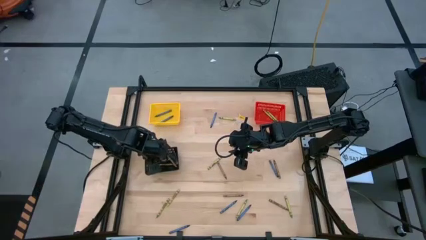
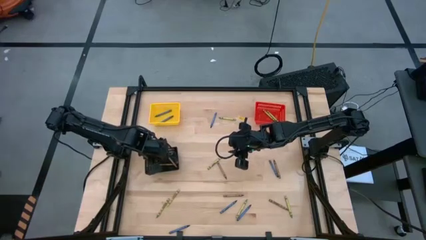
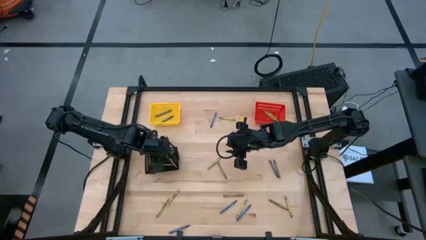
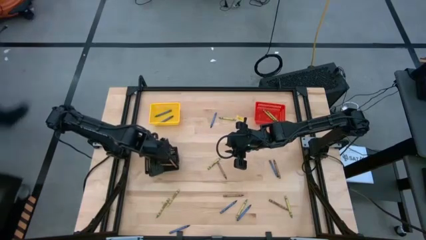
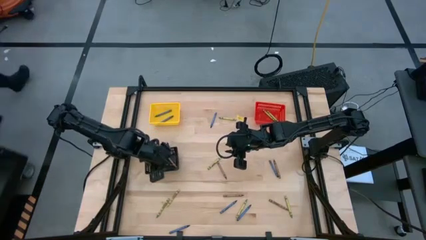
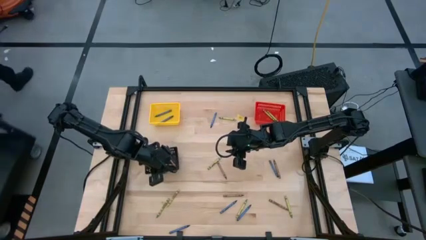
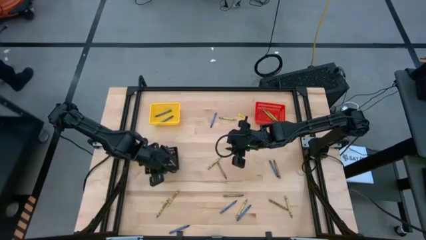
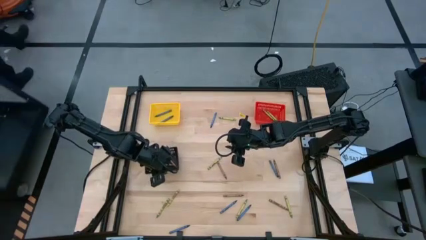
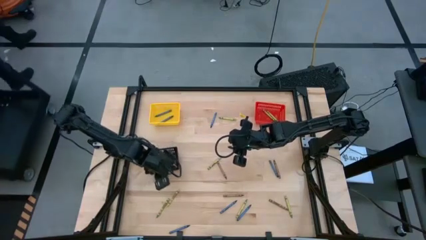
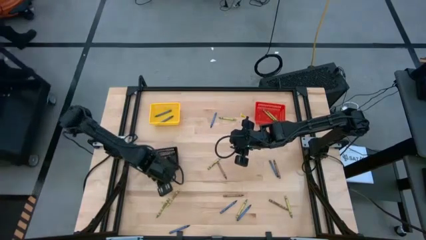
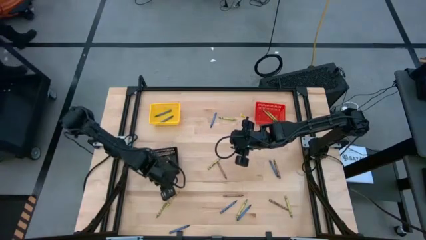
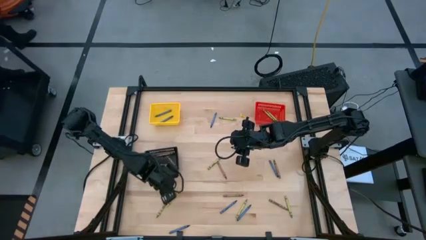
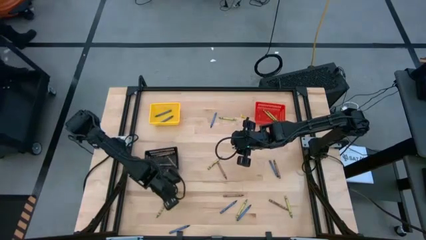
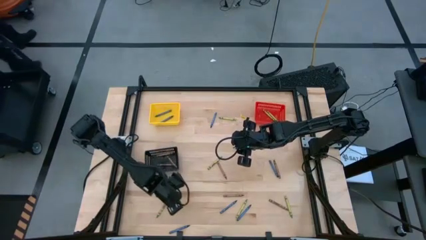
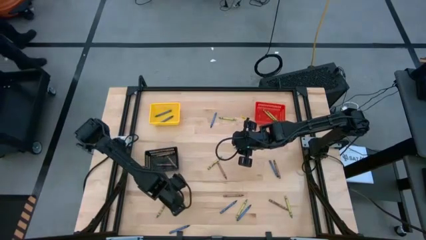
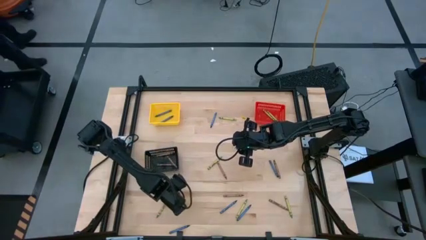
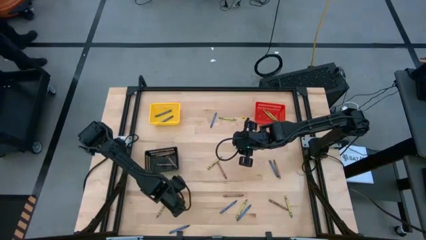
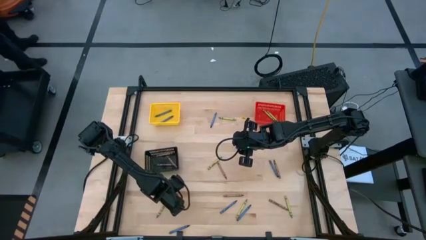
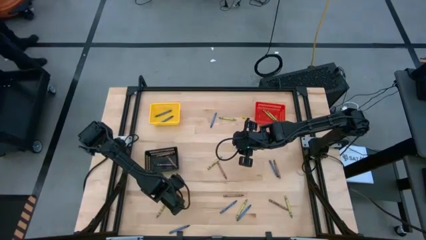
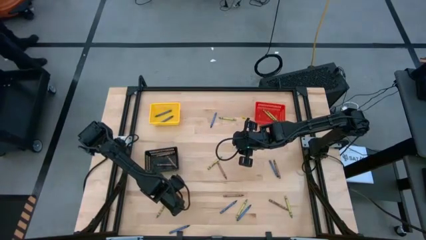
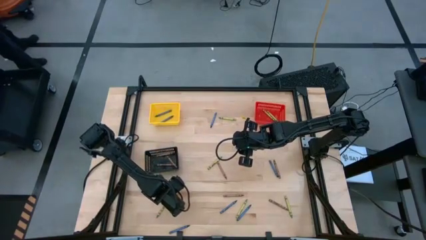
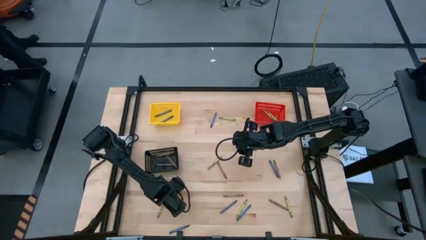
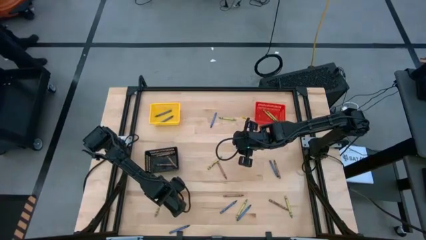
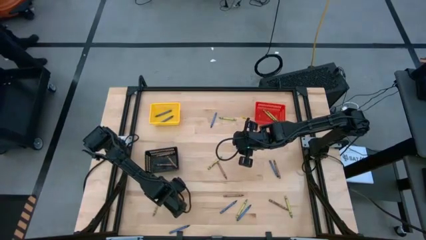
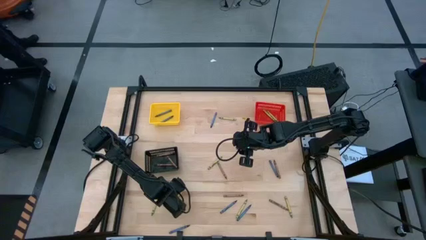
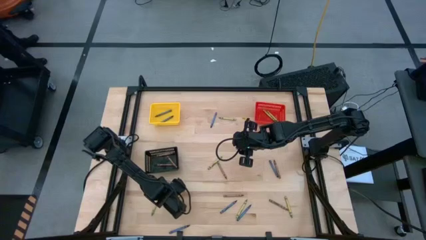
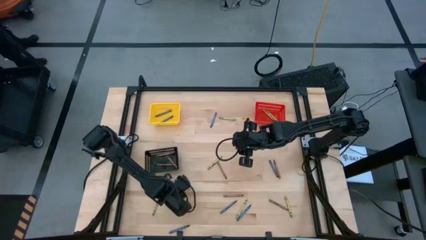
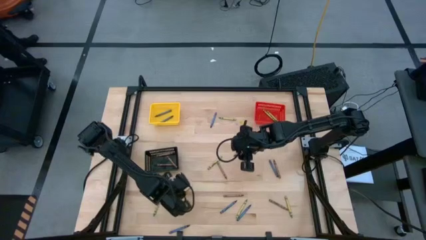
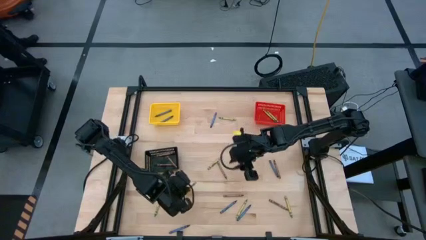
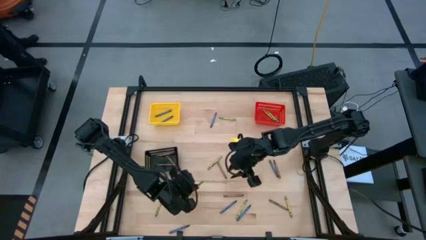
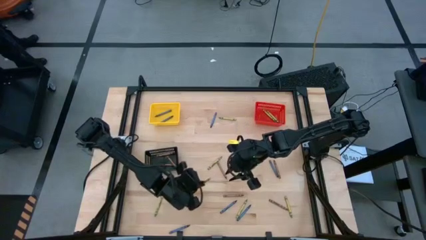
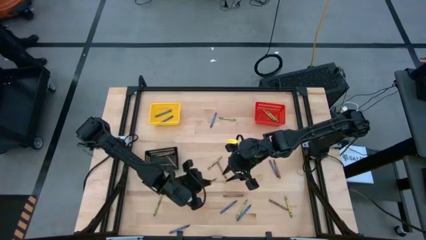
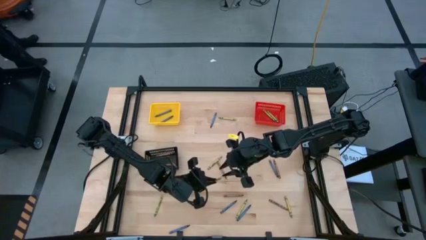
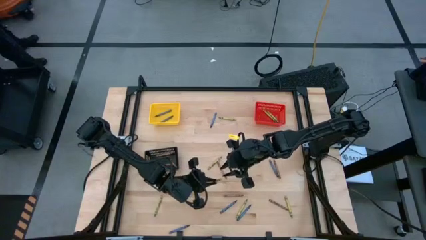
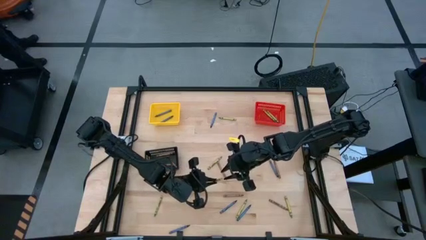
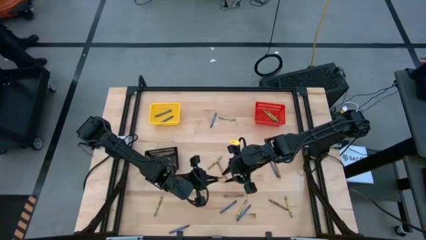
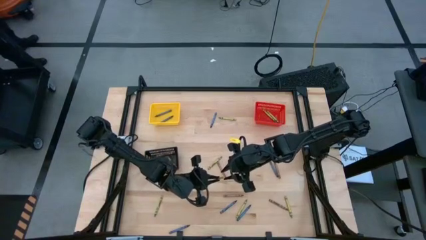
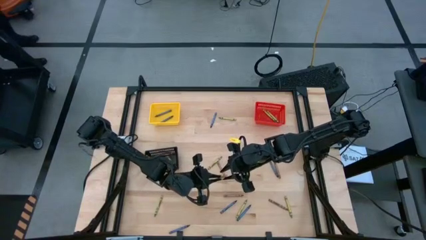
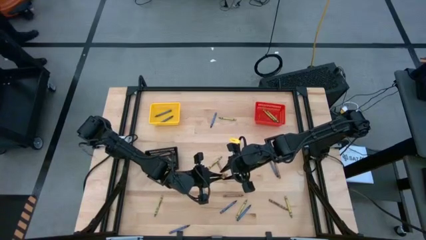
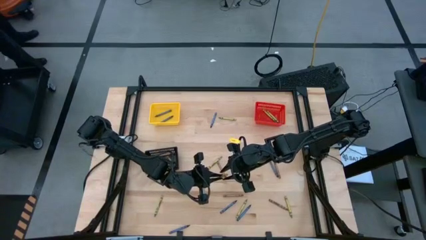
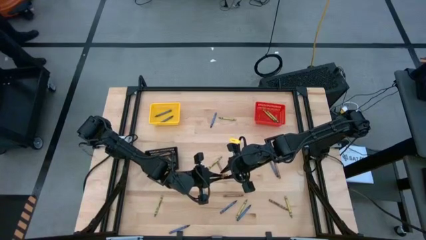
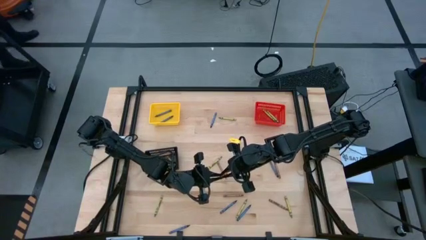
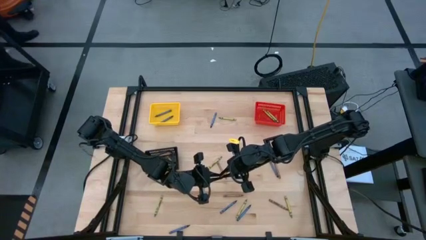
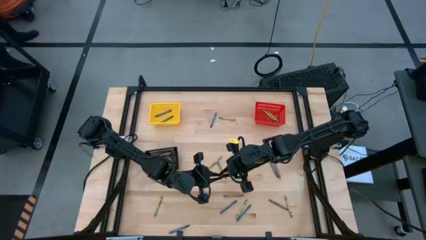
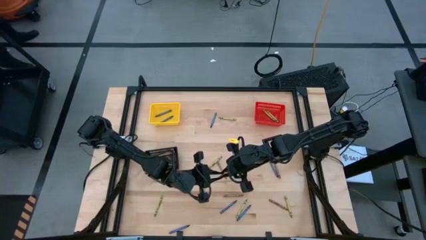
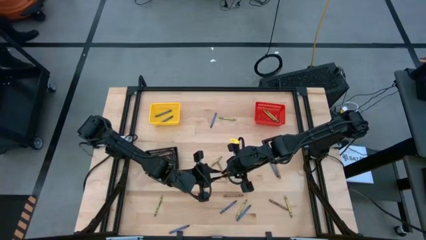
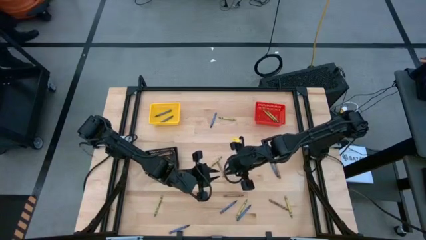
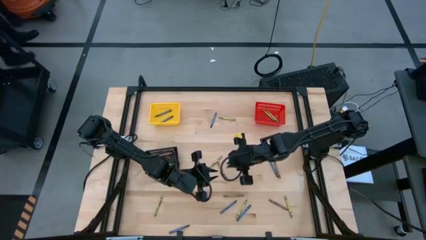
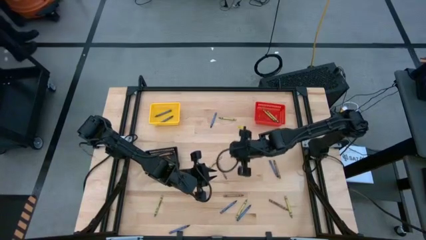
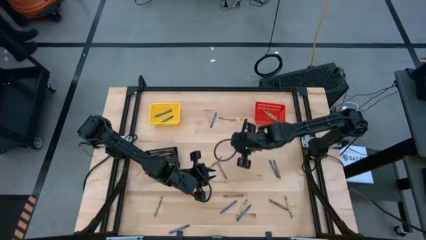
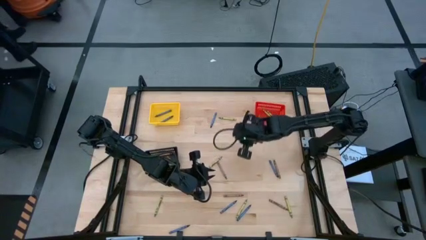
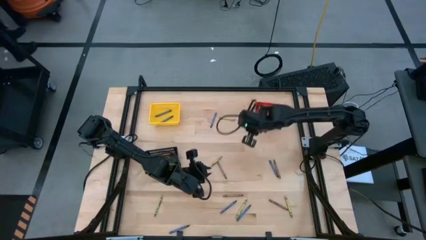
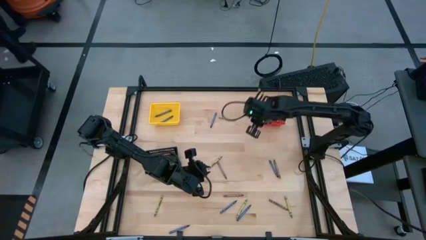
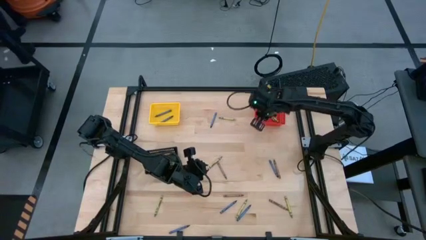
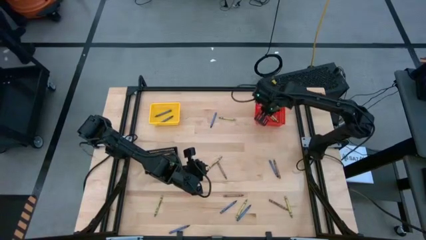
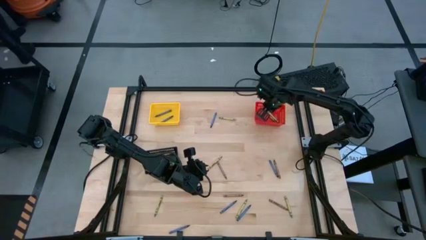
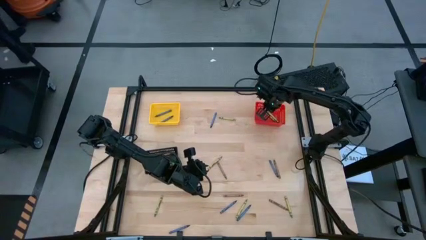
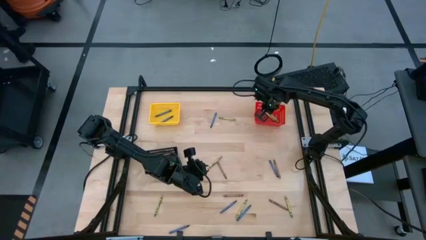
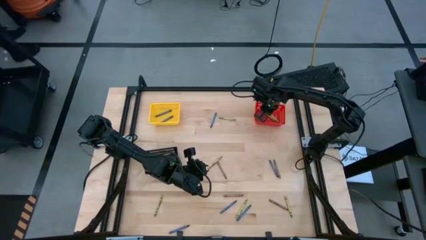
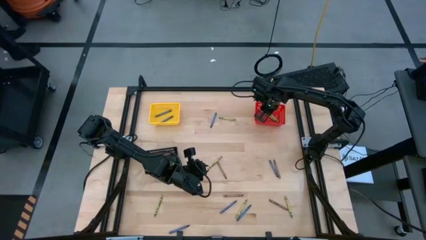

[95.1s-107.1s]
Task: Sort crayons
Put the green crayon into the red bin
